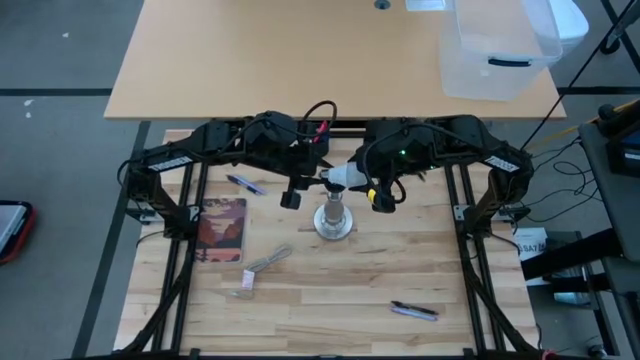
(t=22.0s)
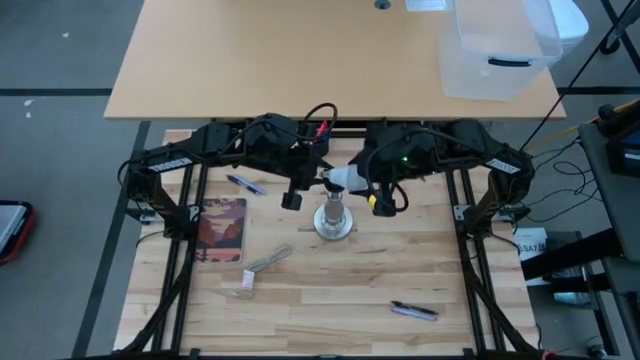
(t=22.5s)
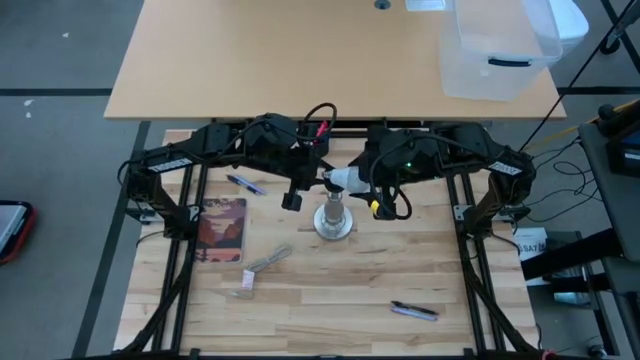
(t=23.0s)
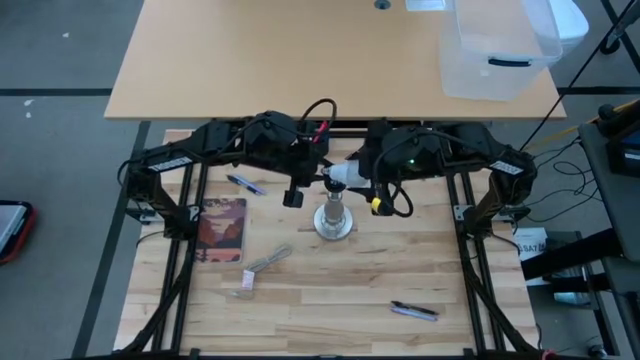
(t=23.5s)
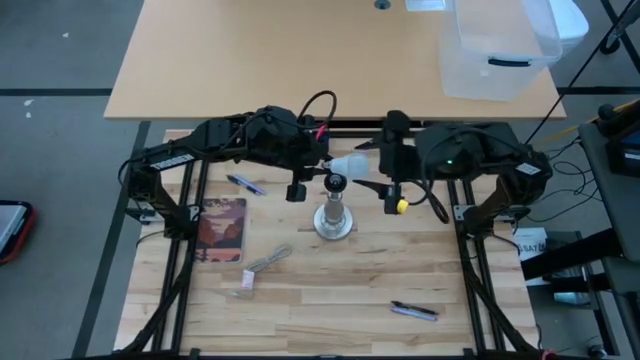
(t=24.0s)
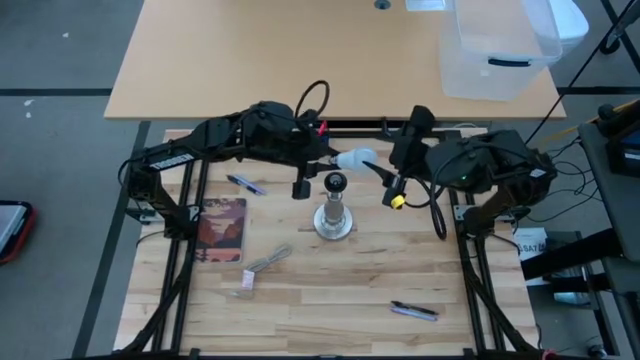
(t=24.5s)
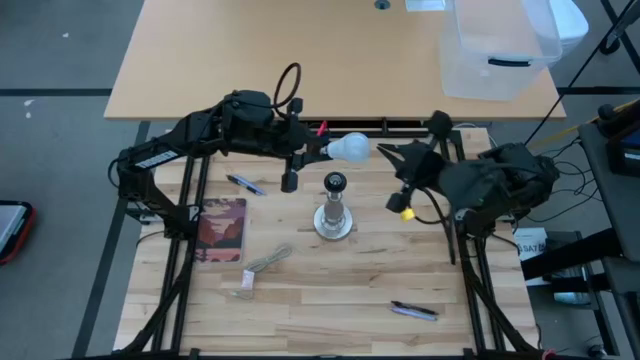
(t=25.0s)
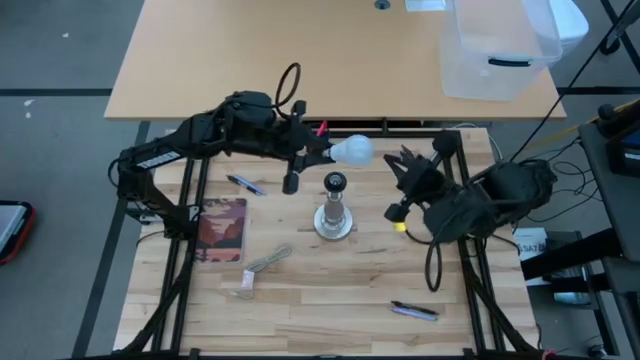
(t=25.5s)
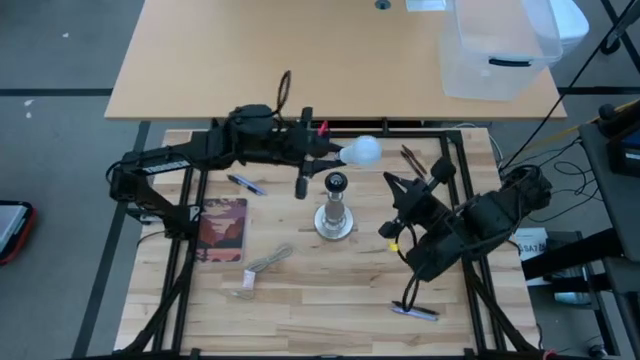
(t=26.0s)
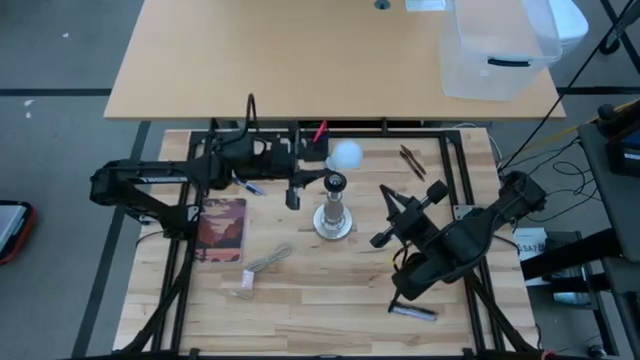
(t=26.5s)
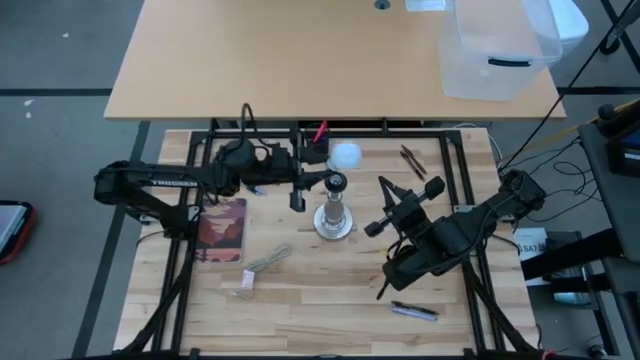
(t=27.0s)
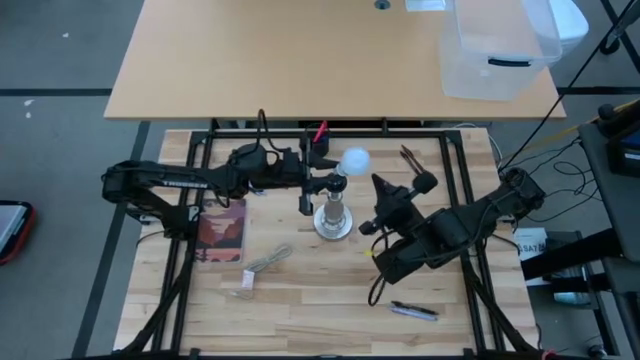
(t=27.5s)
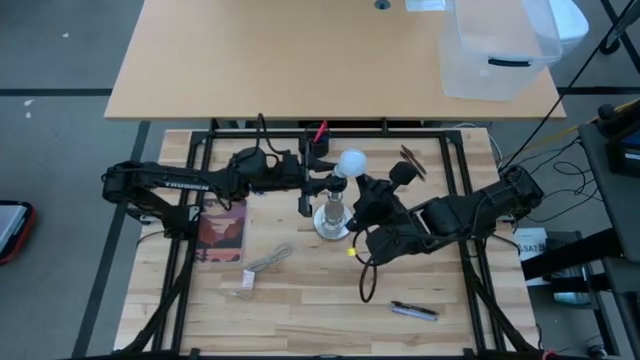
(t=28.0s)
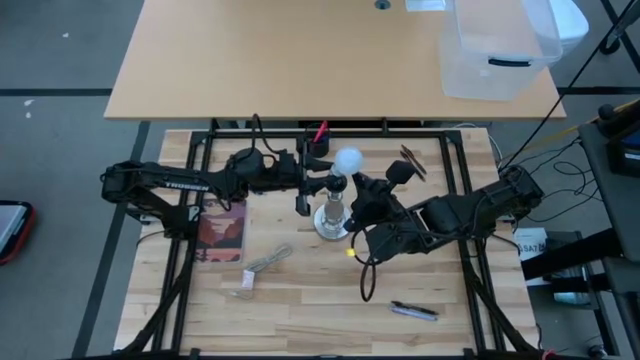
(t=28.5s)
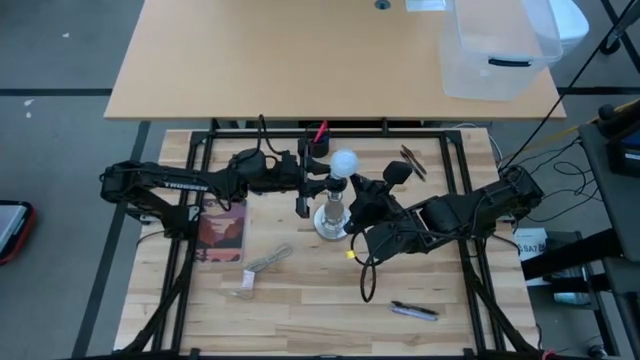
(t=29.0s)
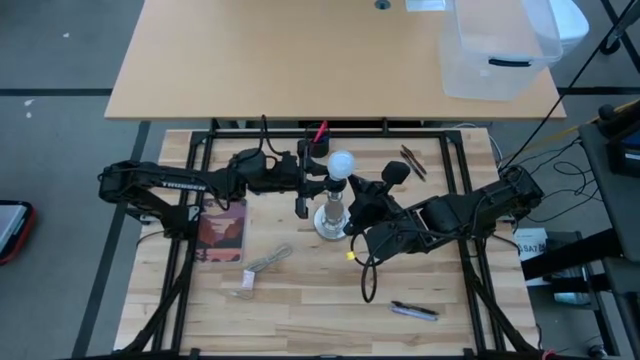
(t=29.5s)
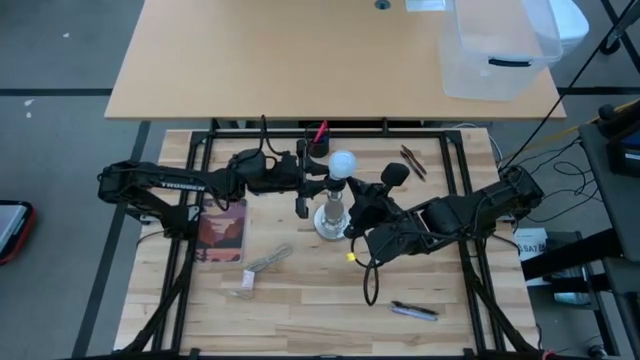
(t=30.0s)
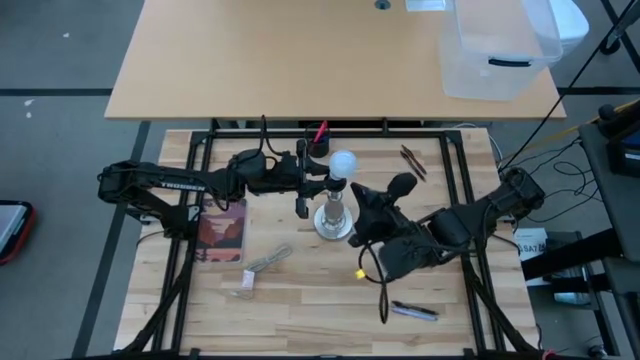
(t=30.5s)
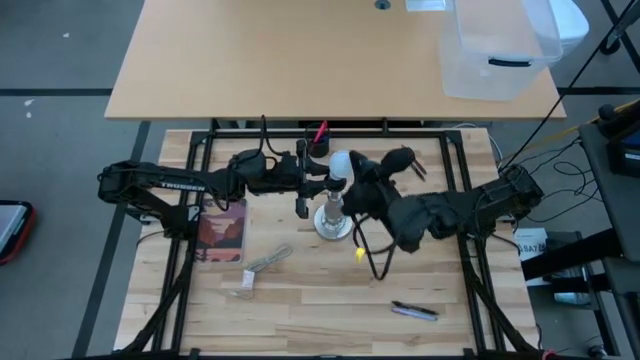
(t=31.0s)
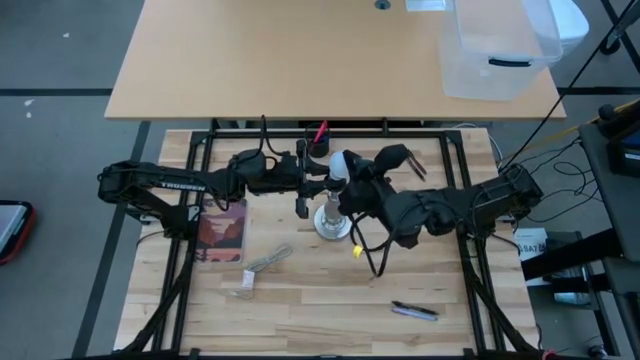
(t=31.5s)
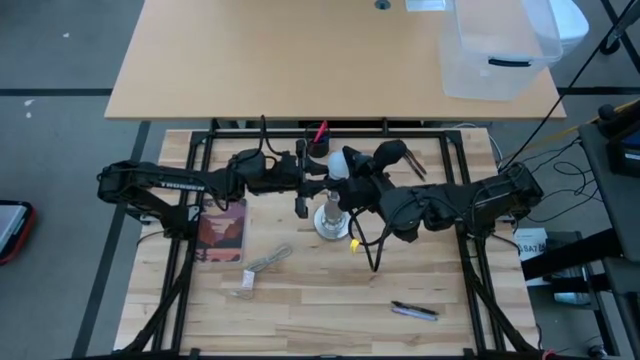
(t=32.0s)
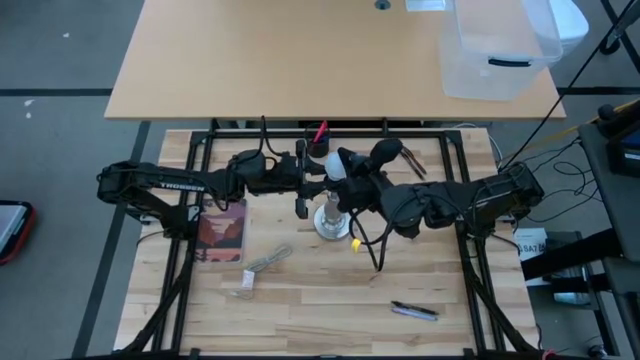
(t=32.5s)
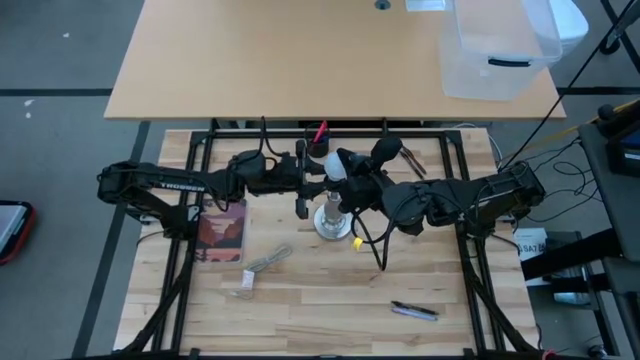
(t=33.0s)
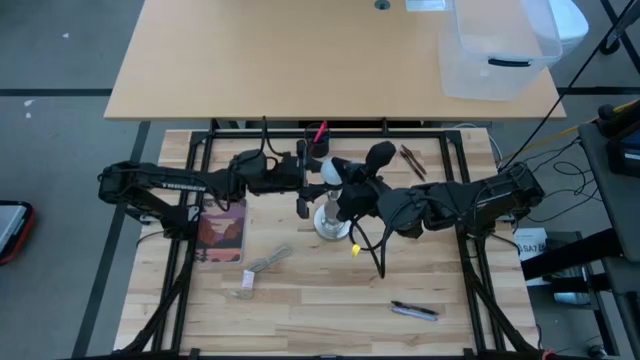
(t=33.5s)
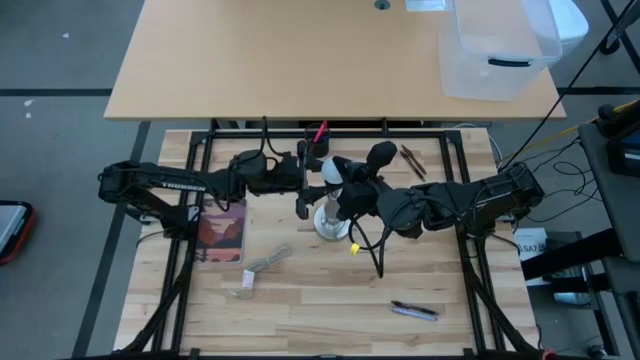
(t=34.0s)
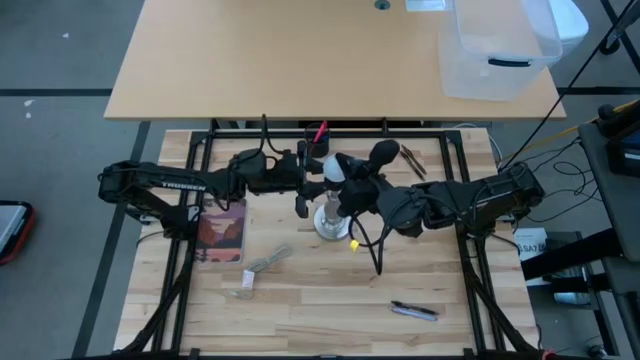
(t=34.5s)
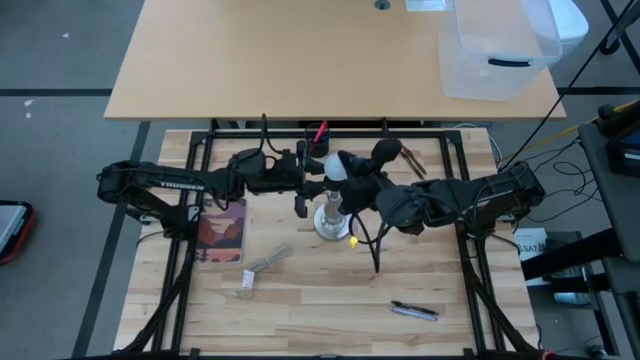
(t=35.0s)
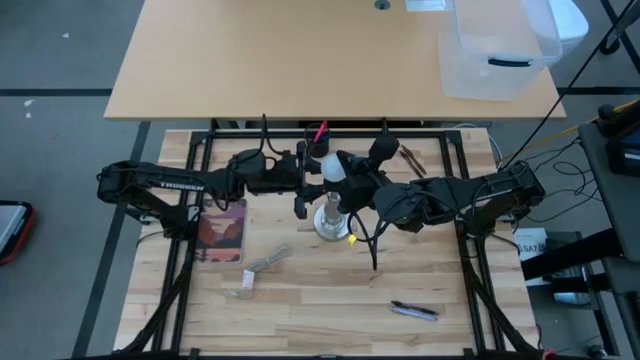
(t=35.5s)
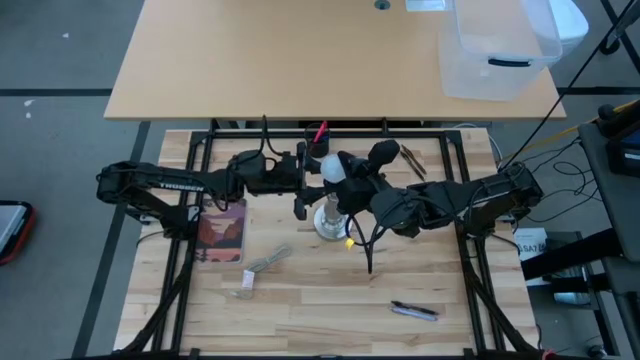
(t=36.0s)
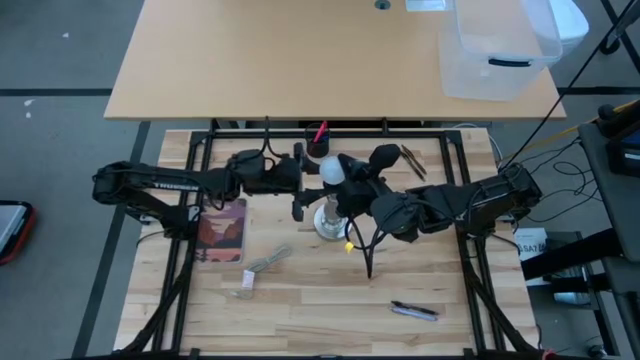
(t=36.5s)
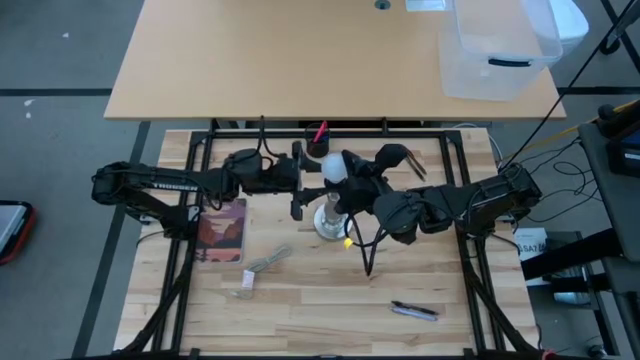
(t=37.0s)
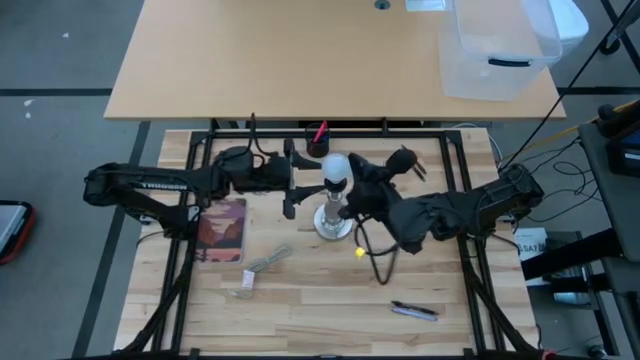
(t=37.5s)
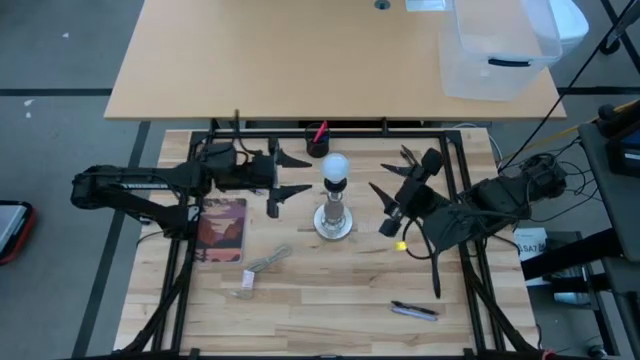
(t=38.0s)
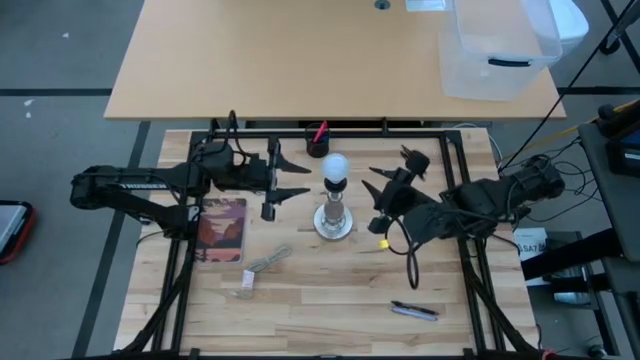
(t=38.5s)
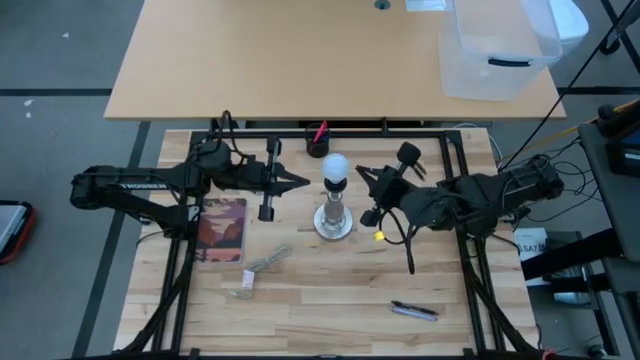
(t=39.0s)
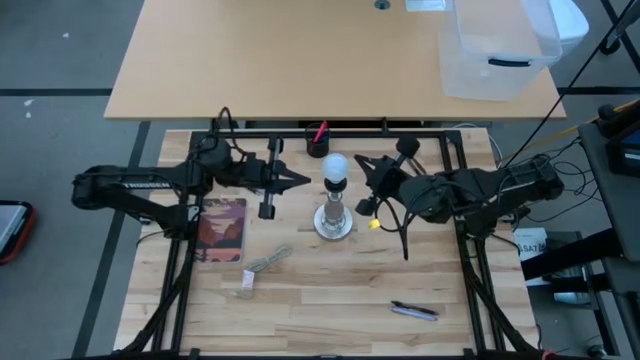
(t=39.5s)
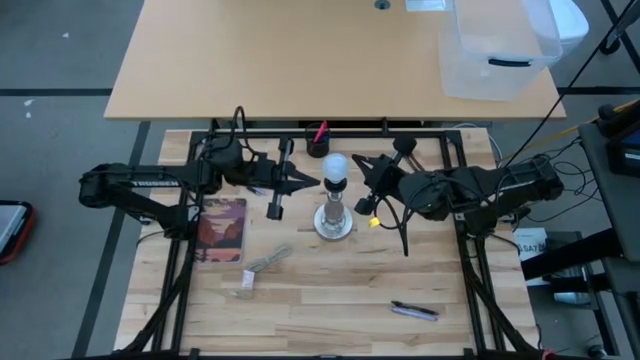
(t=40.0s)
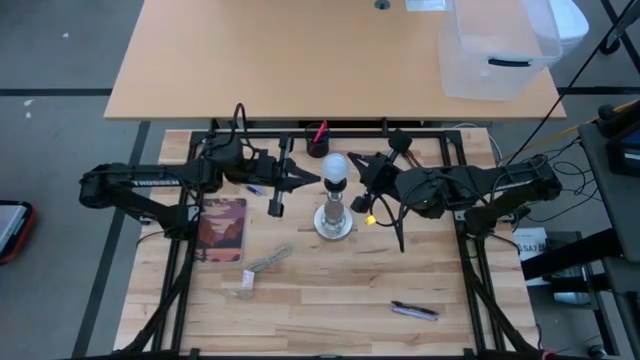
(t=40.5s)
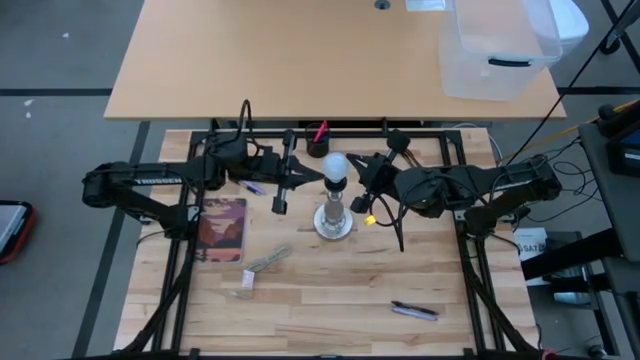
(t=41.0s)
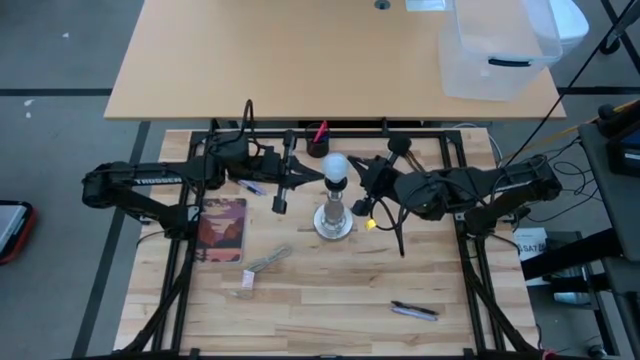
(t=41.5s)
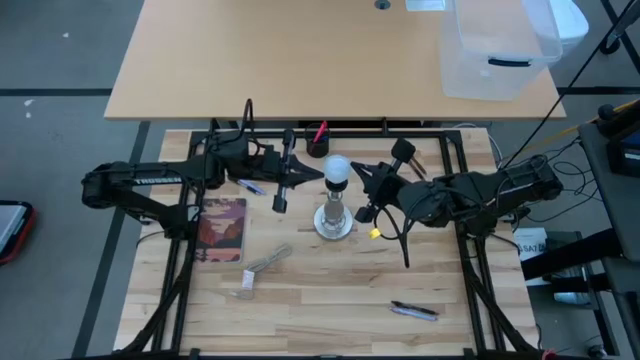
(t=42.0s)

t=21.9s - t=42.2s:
Task: Screw lightbulb
Insert the lightbulb into the desk lamp

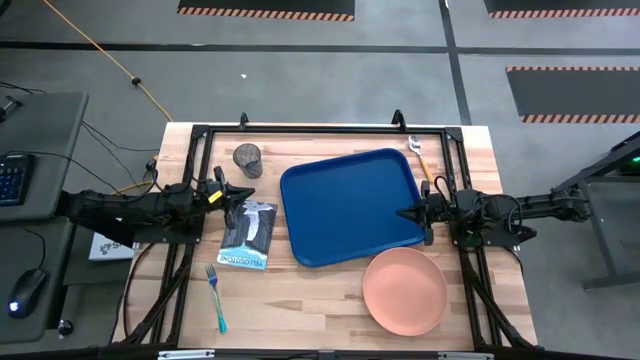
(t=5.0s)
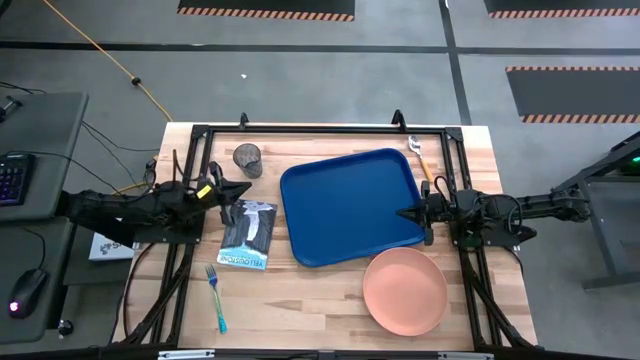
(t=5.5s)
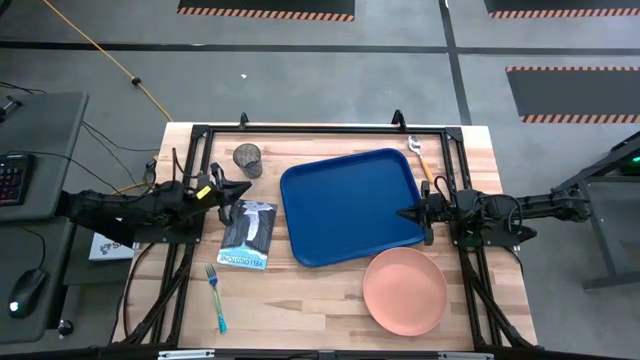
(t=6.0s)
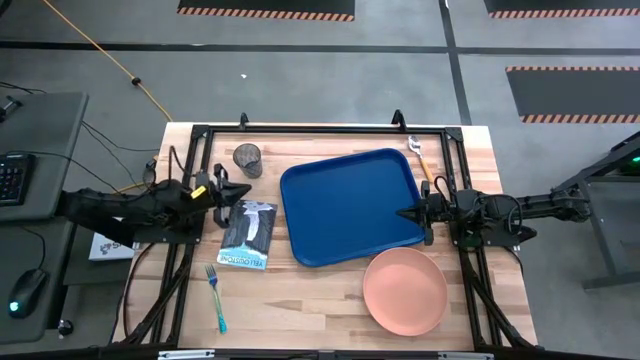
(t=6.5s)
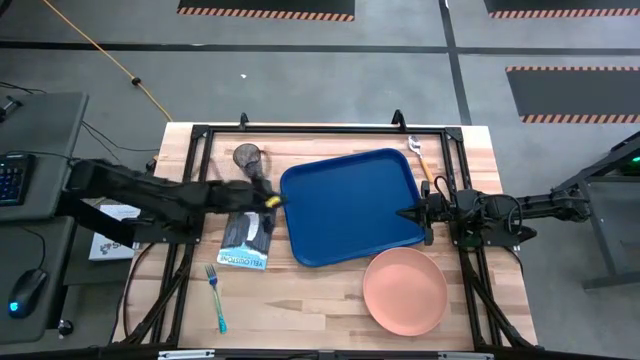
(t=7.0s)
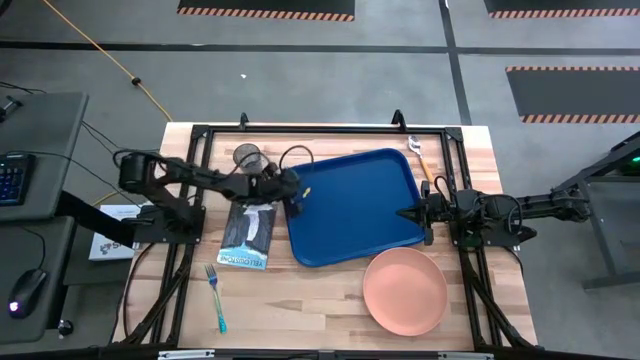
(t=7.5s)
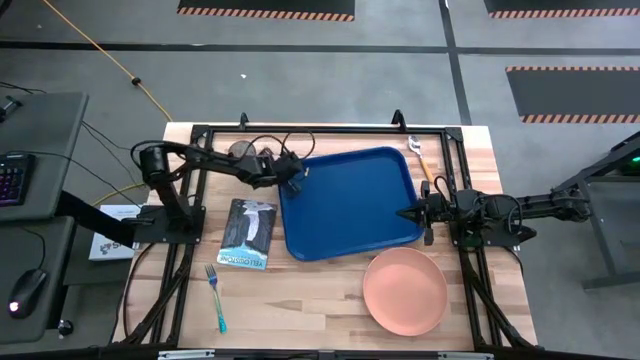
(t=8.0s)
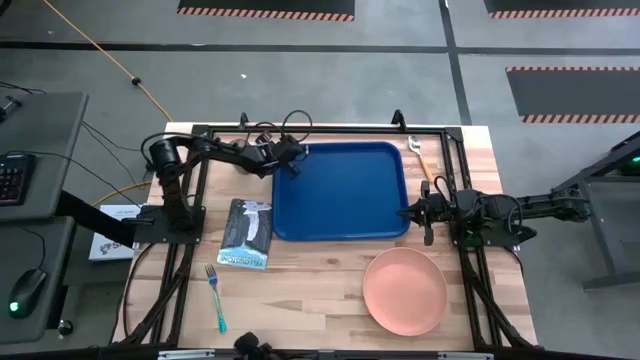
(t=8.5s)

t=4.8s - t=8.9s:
Task: Pick and place plate/cup/fork/spoon on tray
Adjust the blue tray
